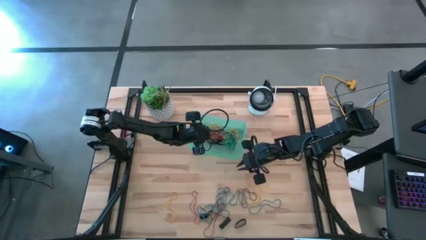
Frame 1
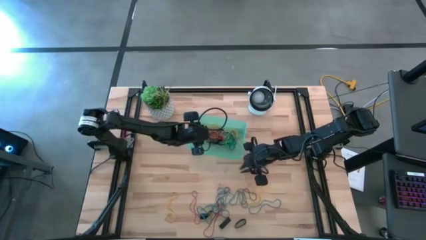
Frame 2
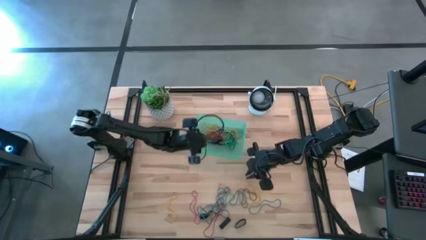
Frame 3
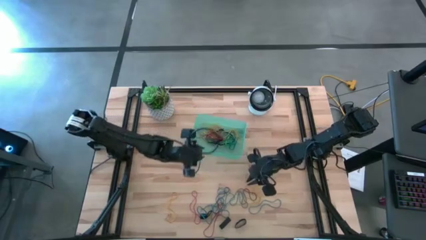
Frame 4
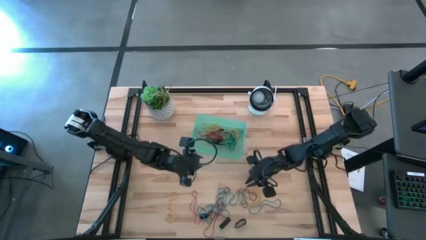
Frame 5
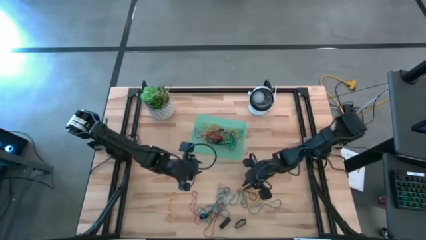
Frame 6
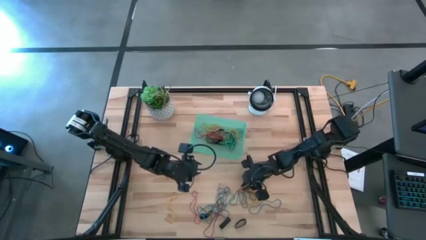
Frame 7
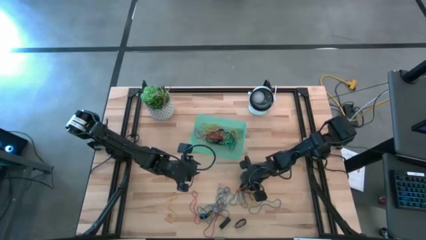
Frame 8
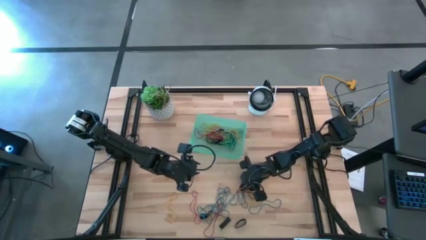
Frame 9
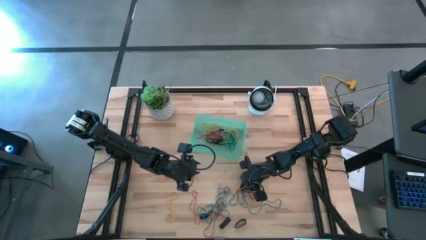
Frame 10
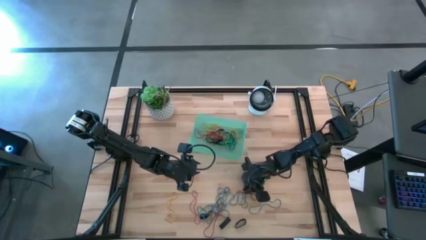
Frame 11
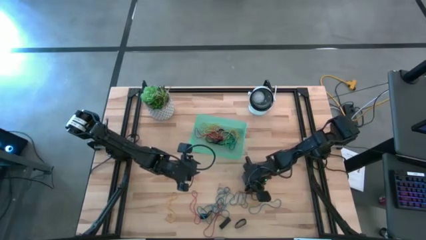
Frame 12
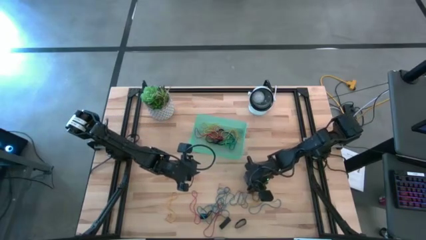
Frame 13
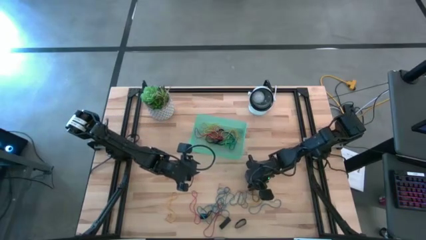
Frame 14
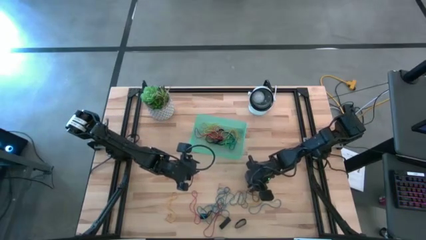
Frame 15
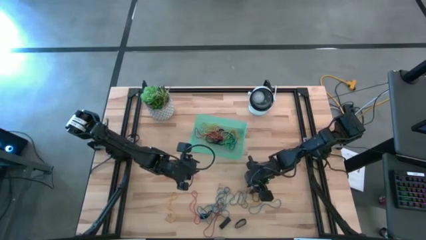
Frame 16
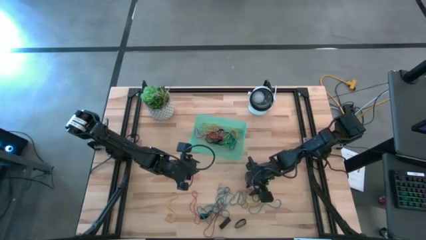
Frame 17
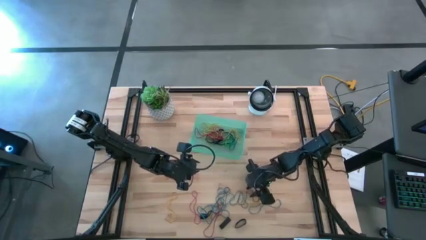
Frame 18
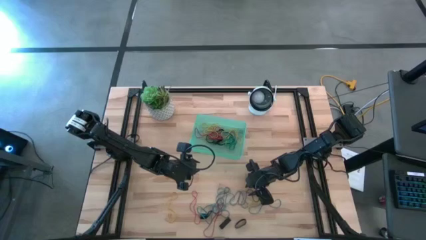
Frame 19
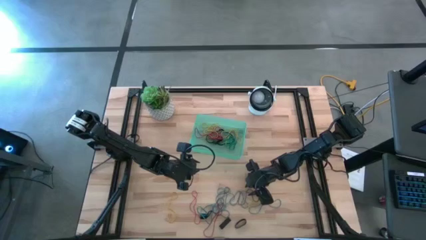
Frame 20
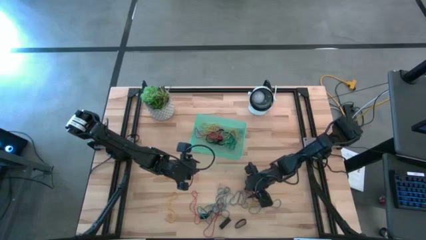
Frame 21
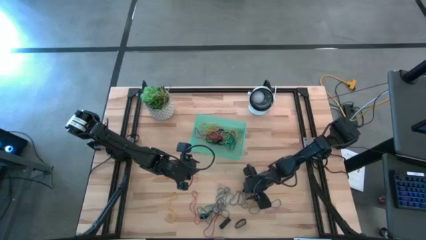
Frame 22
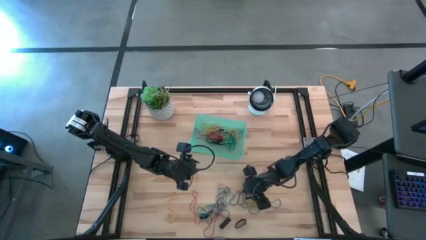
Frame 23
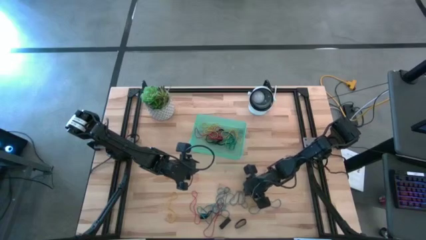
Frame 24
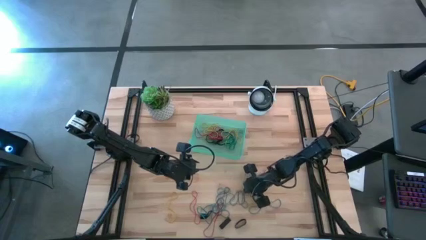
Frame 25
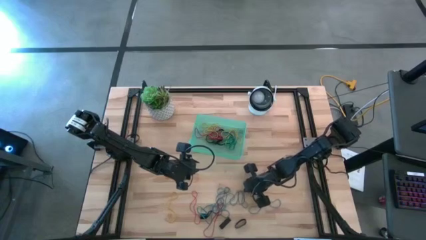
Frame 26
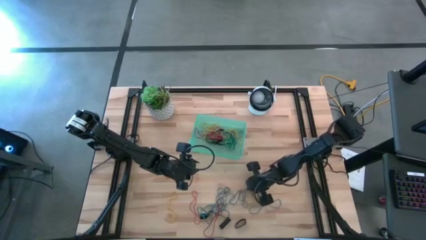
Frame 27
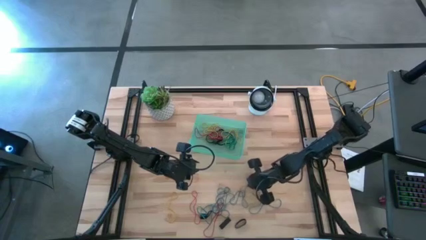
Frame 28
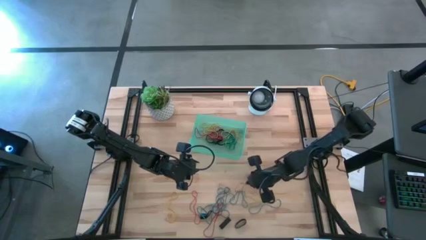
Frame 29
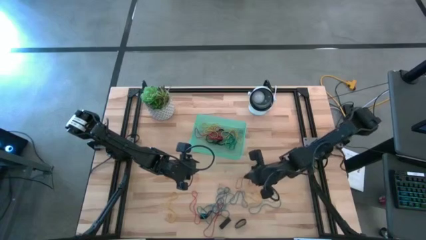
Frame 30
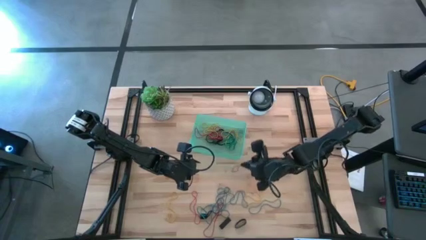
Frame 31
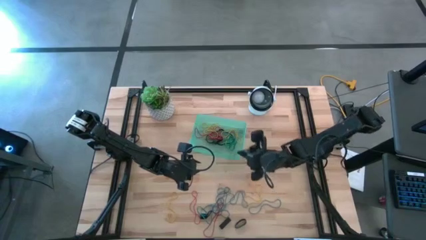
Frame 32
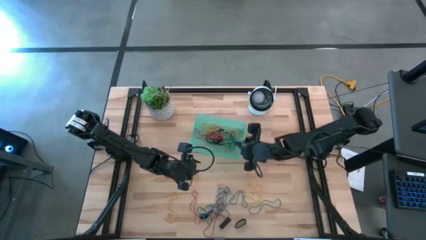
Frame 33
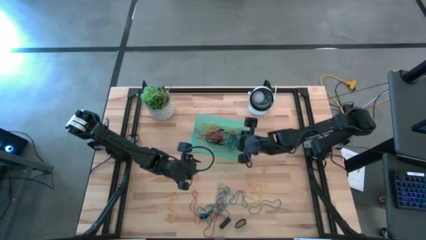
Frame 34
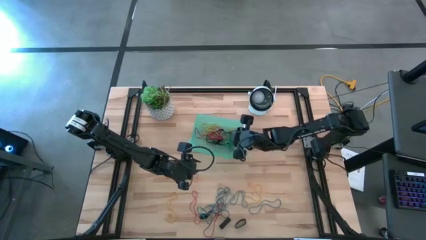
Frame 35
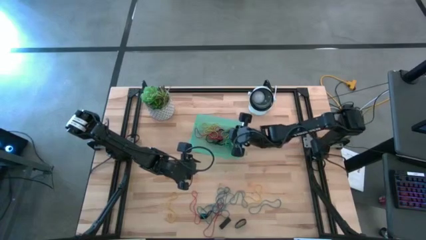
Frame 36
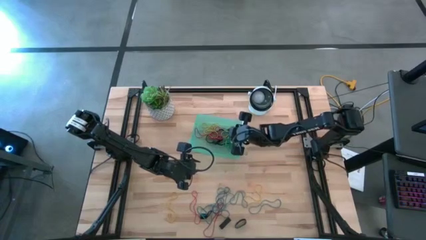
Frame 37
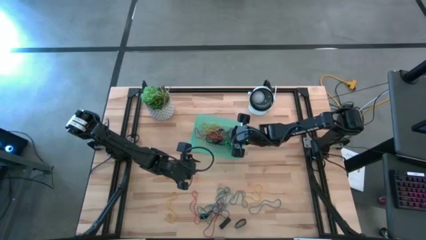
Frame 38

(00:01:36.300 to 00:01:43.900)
Task: Pick and place rubber bands into bin
Put the violet rubber band into the green bin

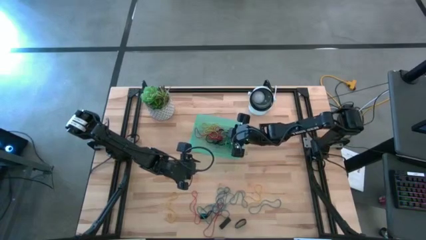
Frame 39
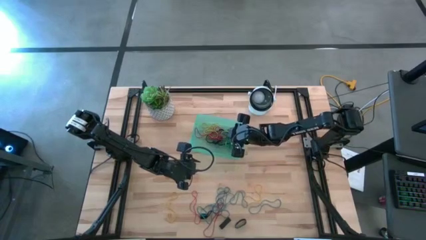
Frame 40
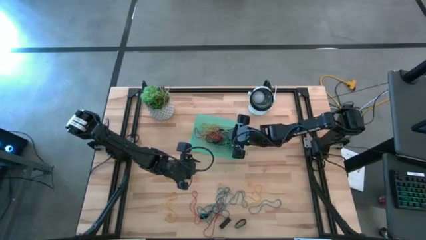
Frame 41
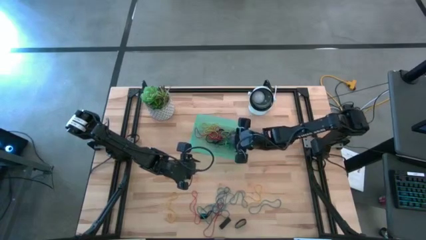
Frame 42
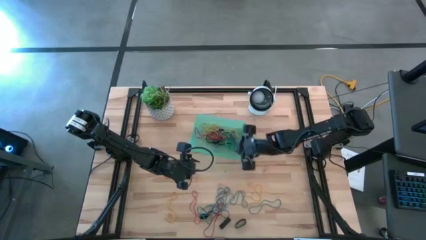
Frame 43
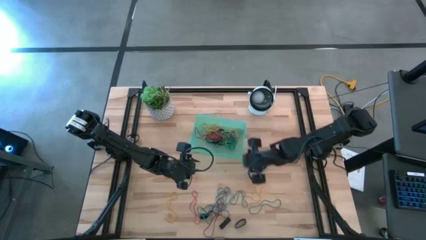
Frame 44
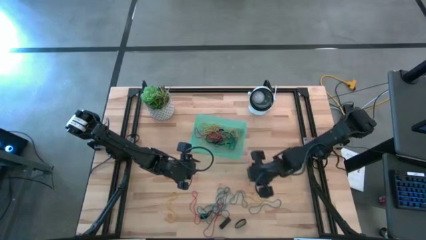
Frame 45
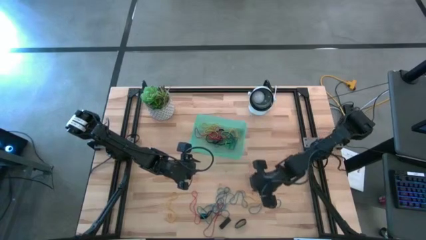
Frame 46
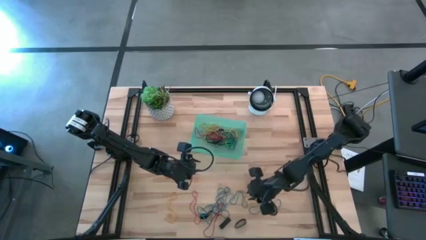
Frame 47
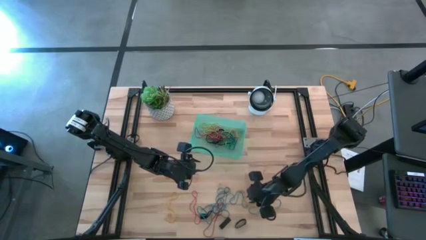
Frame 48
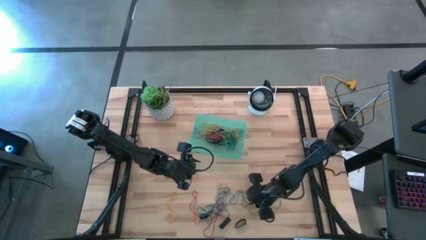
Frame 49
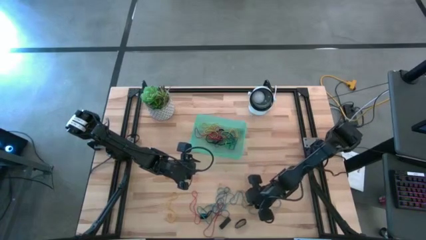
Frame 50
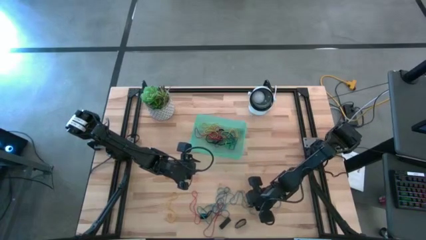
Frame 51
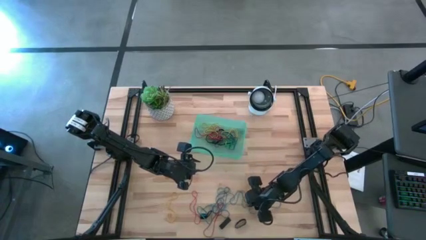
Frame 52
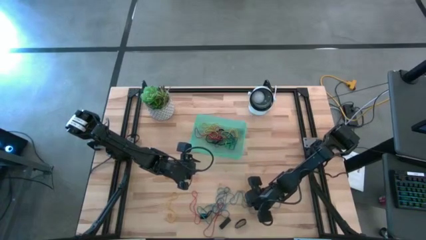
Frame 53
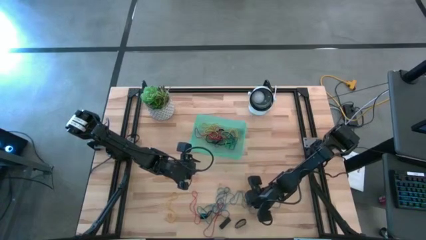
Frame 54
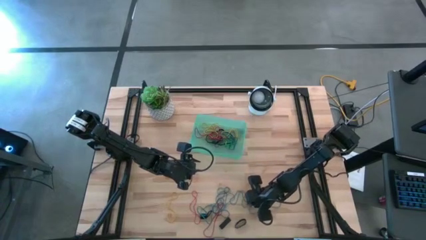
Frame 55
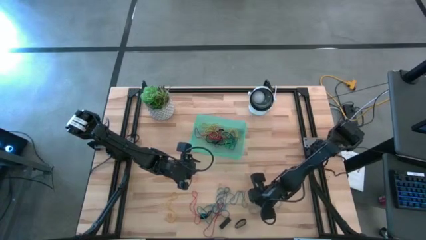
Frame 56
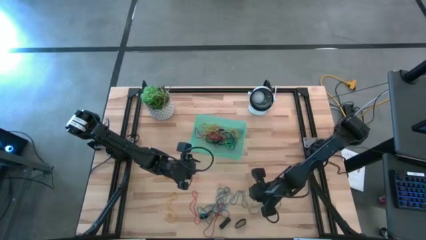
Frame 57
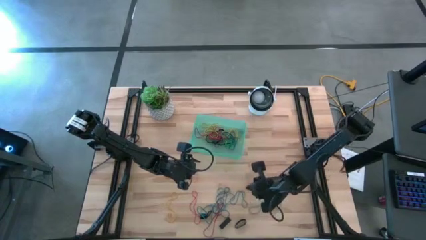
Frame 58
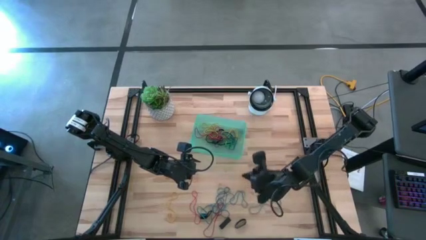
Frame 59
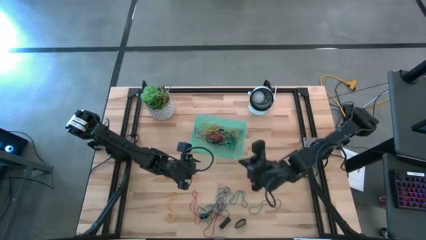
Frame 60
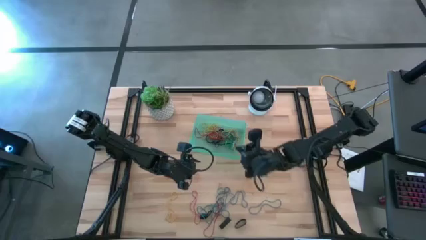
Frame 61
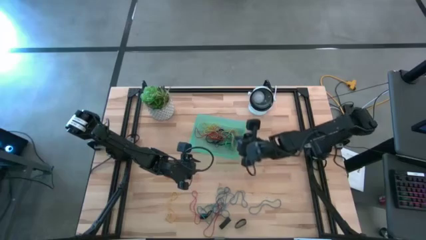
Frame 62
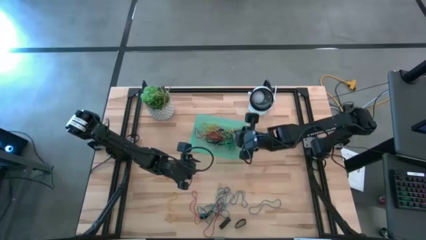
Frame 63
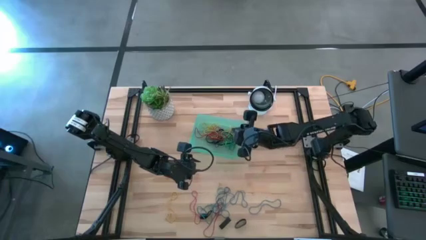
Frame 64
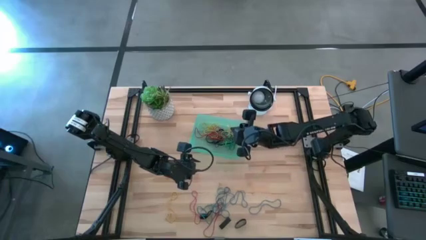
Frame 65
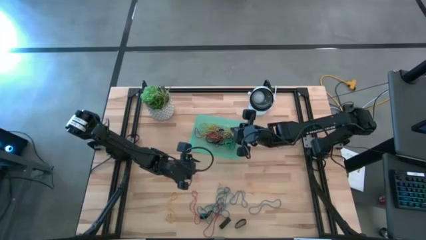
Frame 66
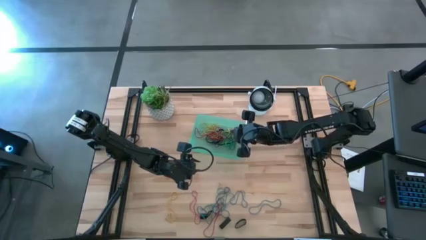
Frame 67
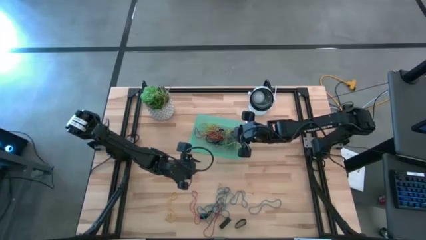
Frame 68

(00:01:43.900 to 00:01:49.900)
Put the yellow rubber band into the green bin

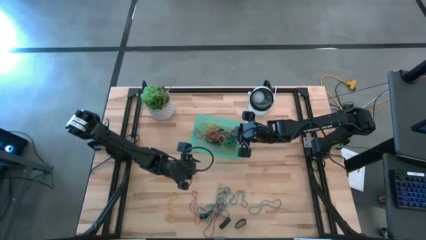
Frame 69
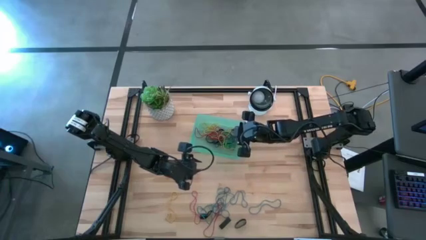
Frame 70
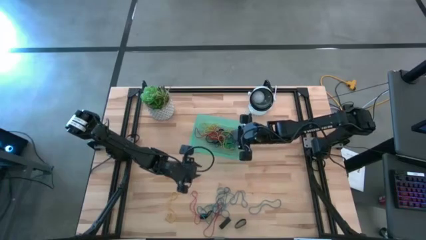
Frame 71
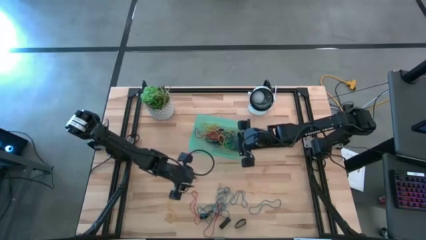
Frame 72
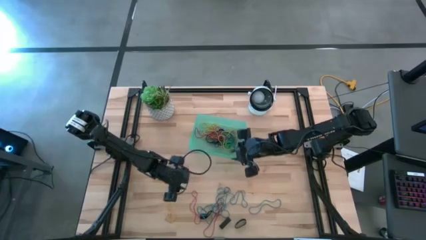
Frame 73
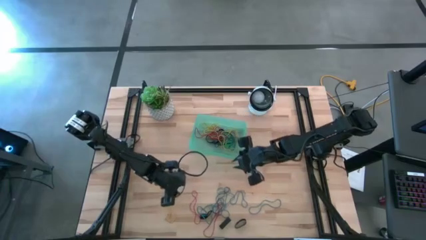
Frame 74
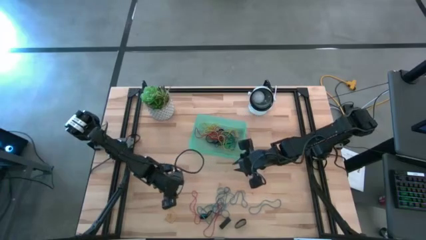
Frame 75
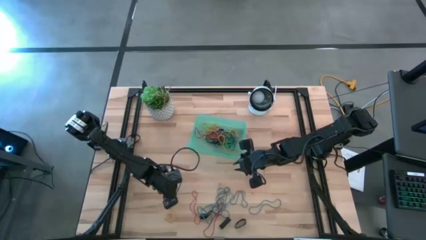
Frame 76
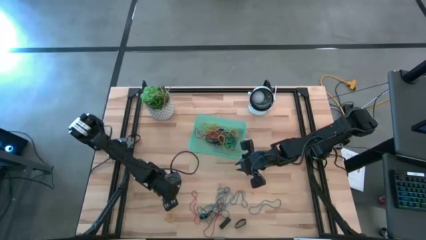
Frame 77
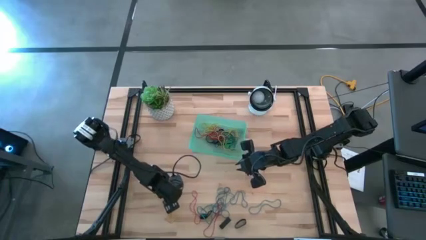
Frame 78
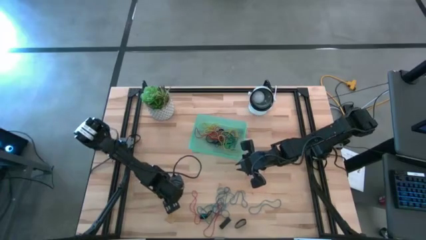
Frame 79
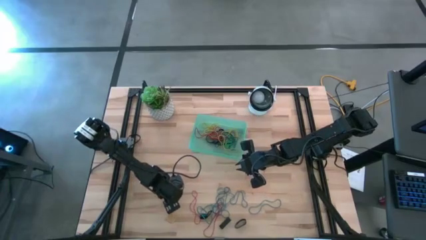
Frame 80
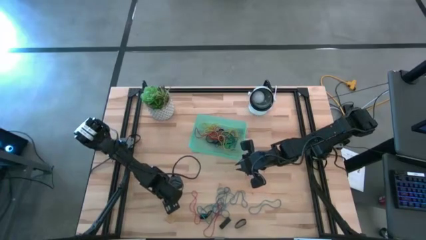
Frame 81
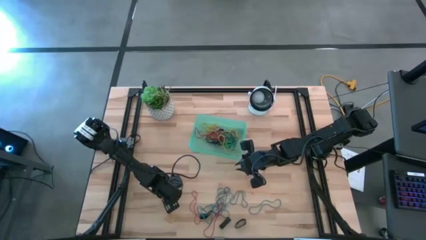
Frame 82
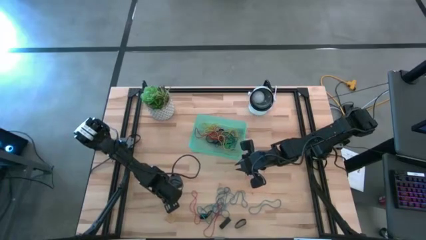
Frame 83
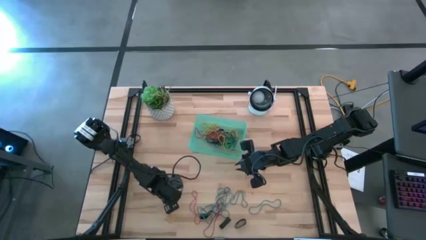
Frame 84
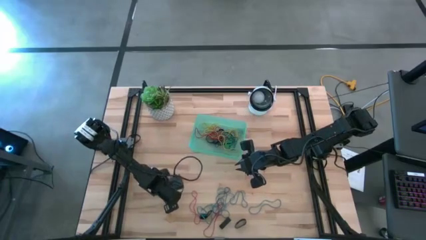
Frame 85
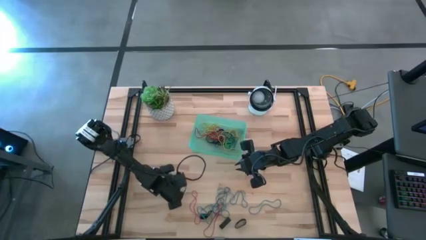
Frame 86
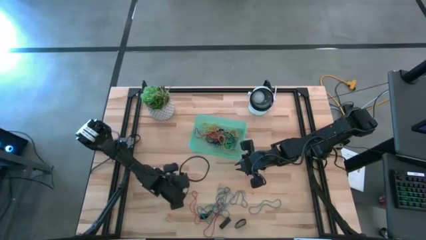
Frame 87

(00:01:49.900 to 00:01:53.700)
Put the yellow rubber band into the green bin
